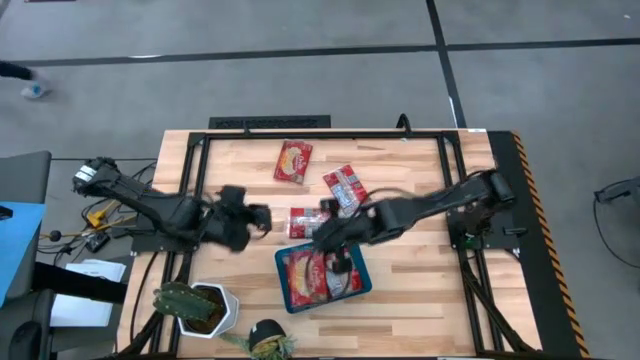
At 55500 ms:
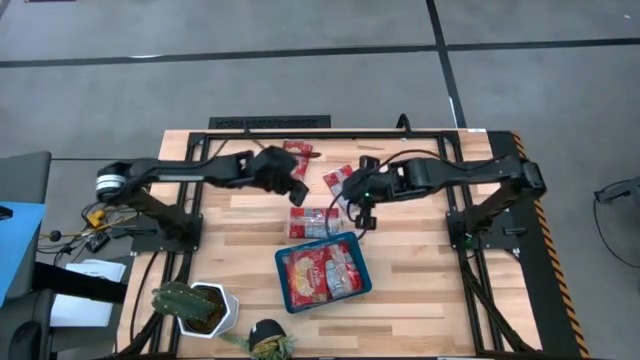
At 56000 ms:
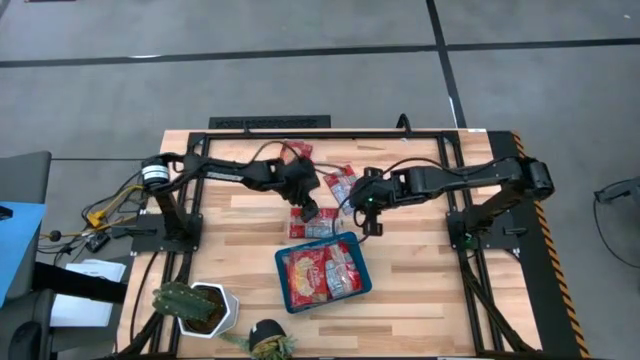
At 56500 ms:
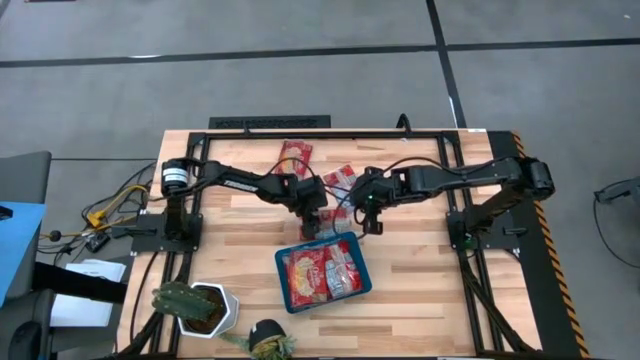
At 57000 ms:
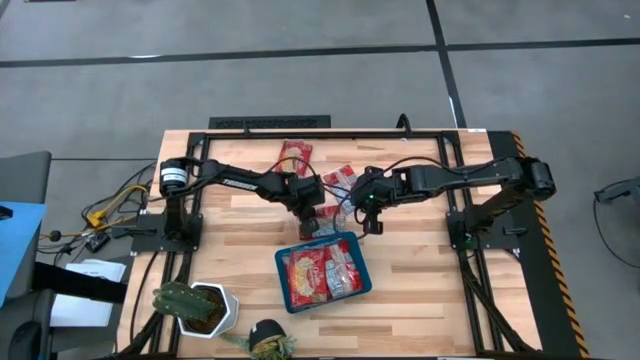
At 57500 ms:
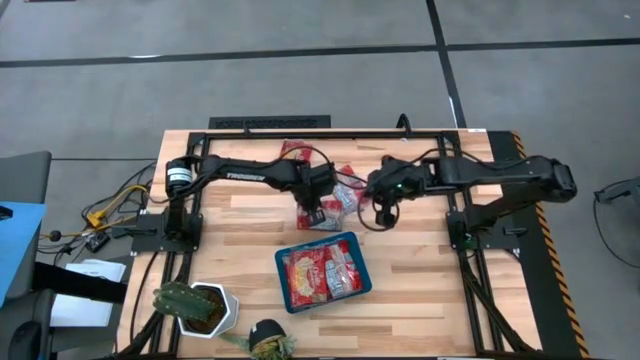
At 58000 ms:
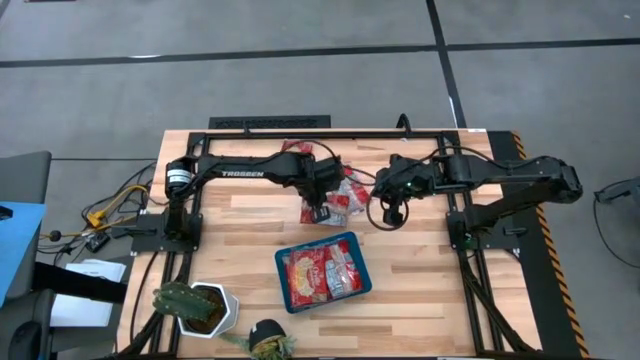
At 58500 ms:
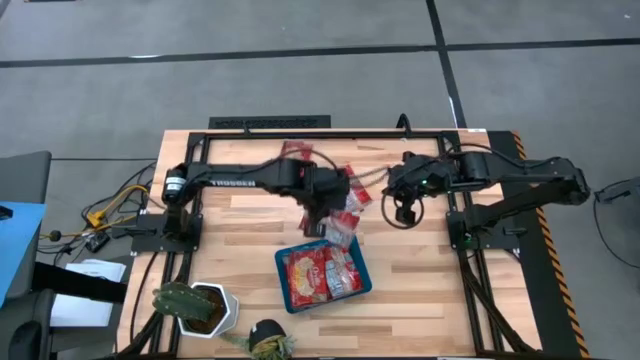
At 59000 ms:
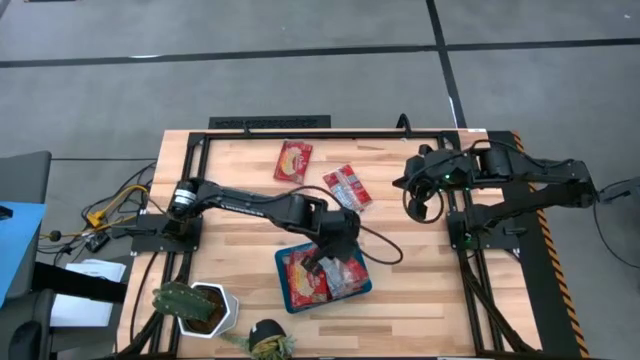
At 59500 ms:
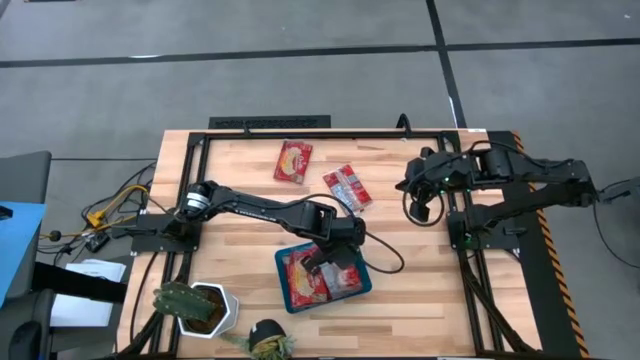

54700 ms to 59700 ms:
Task: Sort popcorn bags into baskets
Put the popcorn bag into the blue bin

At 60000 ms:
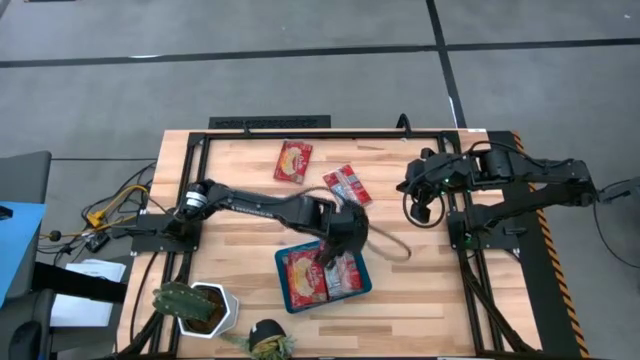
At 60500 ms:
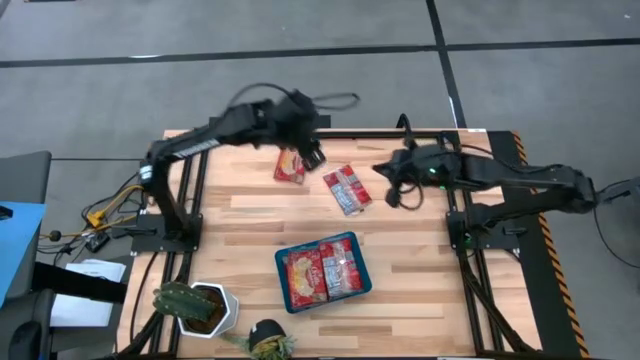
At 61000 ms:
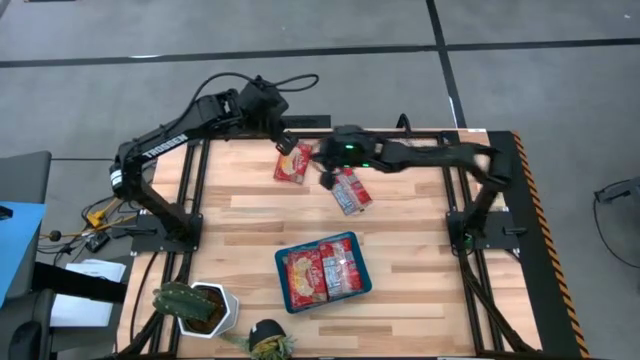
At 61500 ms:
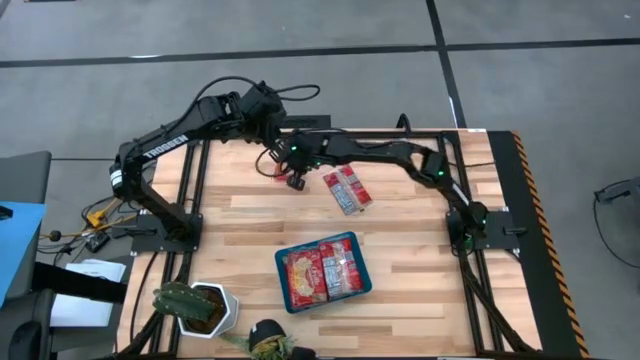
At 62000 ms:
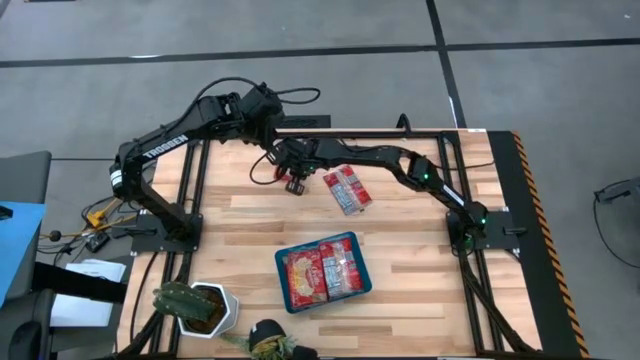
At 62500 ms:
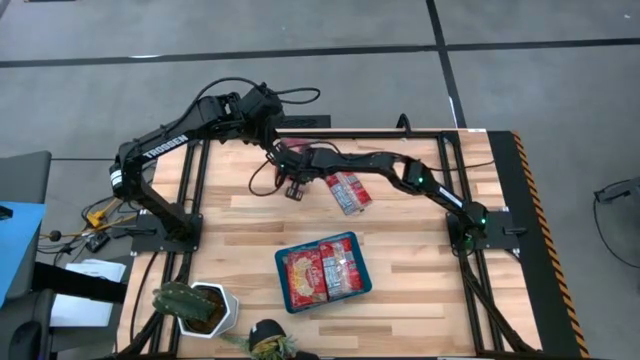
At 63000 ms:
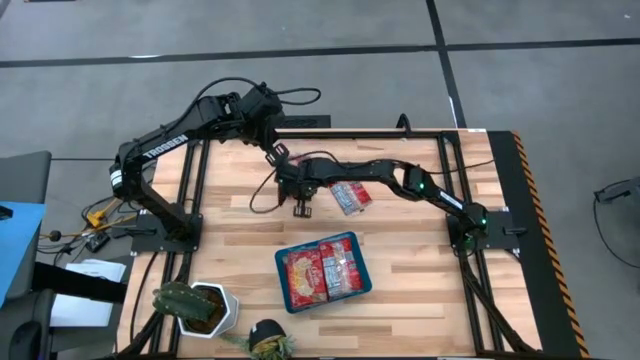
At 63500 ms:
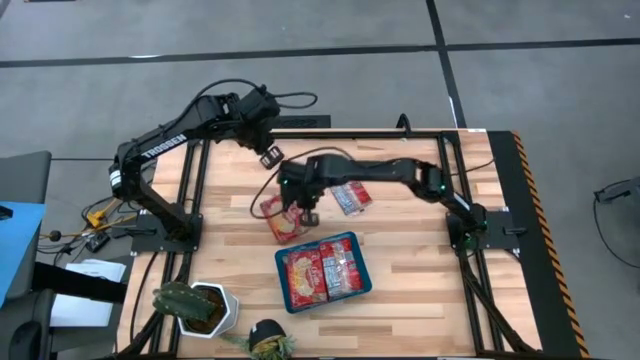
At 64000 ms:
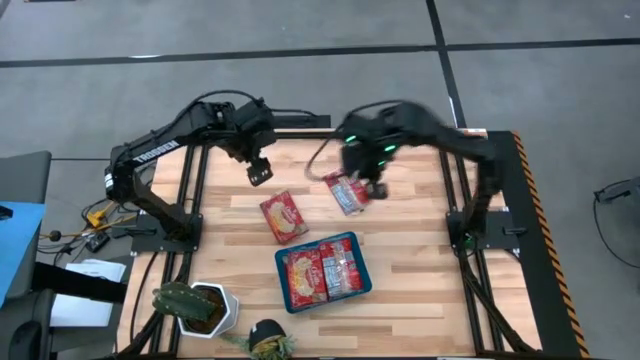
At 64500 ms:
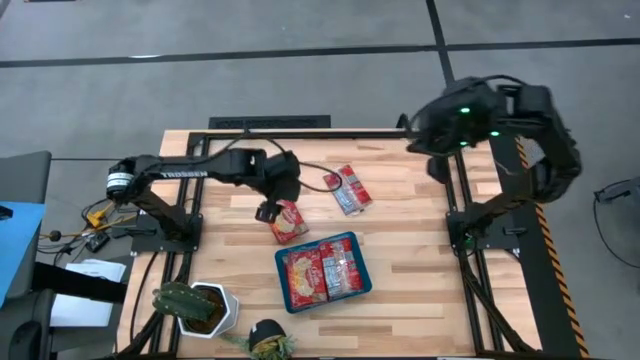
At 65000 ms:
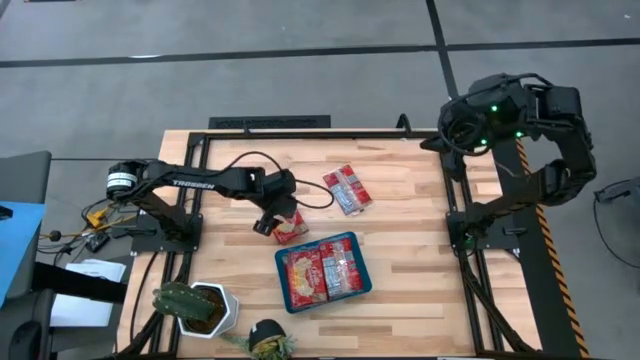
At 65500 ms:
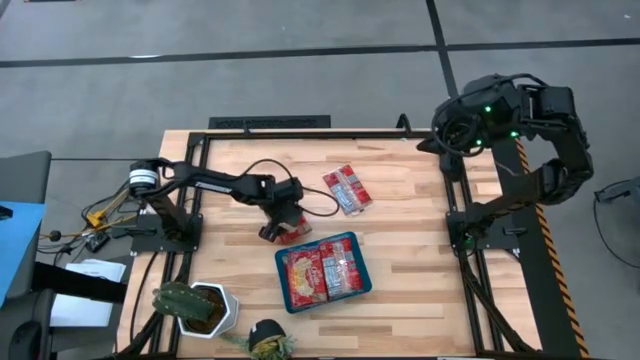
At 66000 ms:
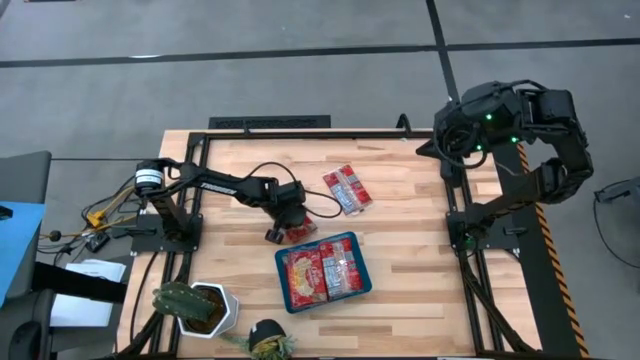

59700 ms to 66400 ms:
Put the popcorn bag into the blue bin

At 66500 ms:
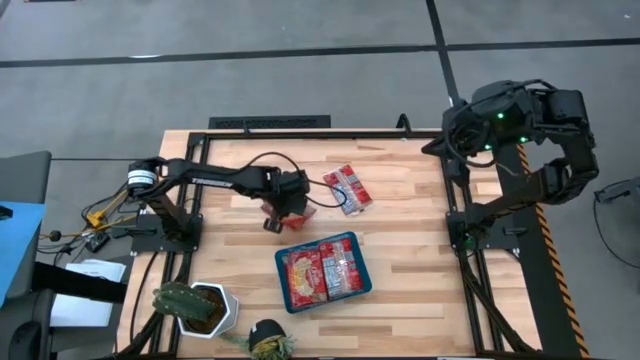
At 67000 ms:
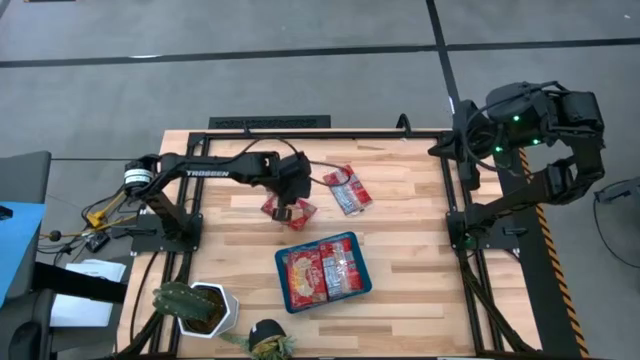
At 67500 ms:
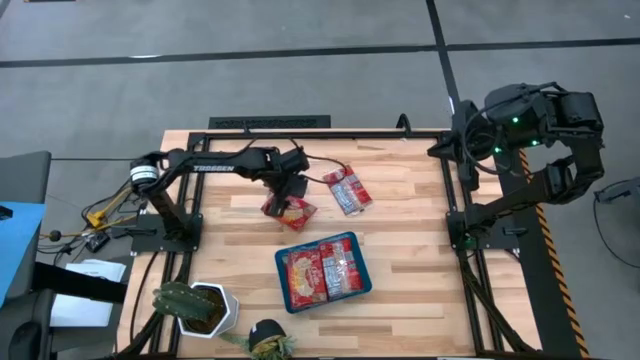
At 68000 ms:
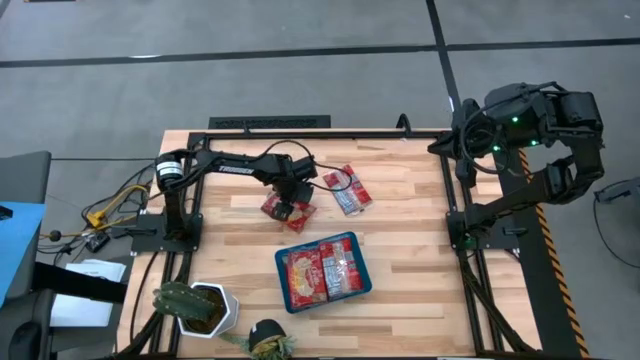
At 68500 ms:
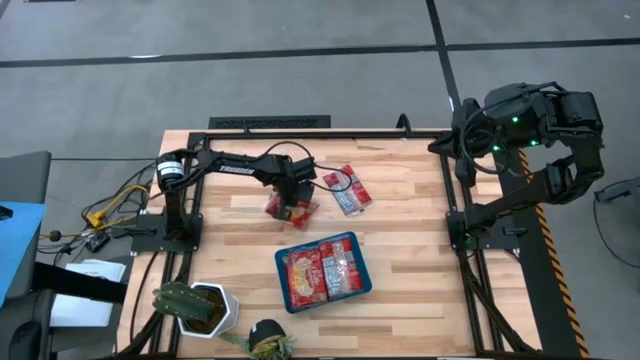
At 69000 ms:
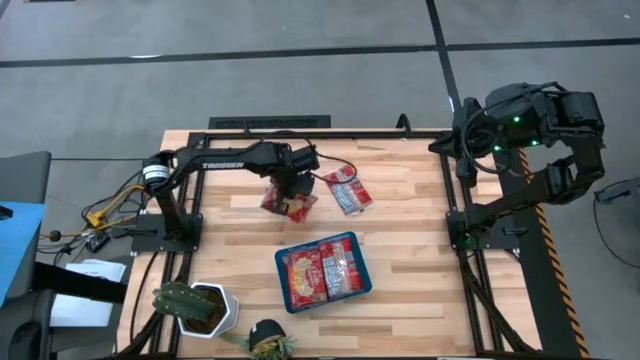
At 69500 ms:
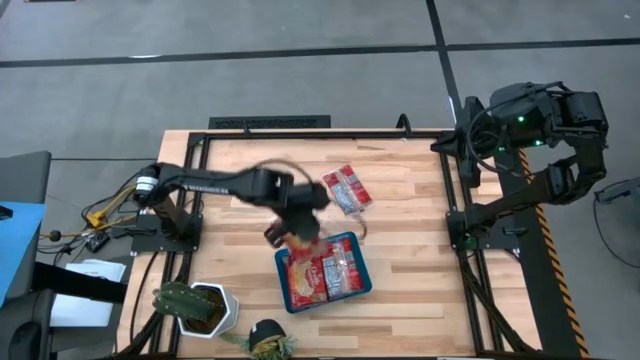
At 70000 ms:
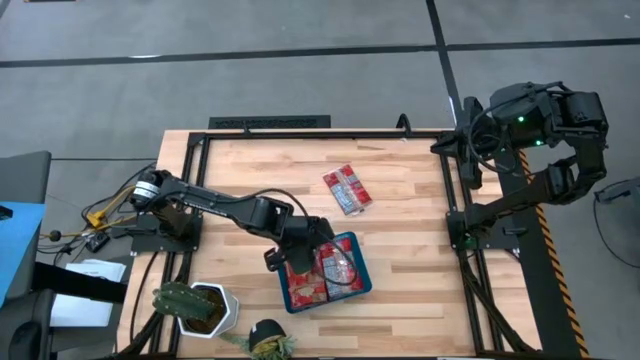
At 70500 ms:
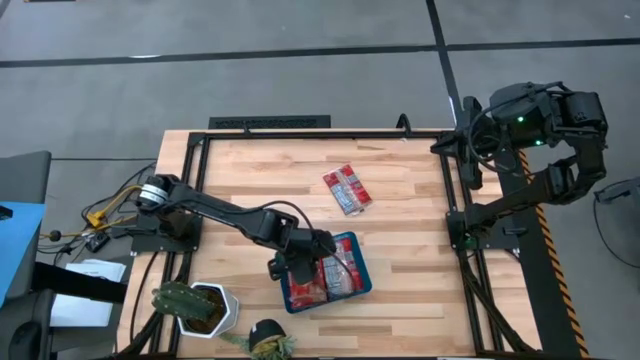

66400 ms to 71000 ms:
Put the popcorn bag into the blue bin

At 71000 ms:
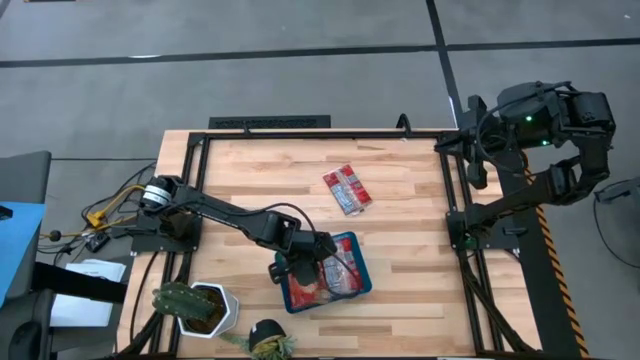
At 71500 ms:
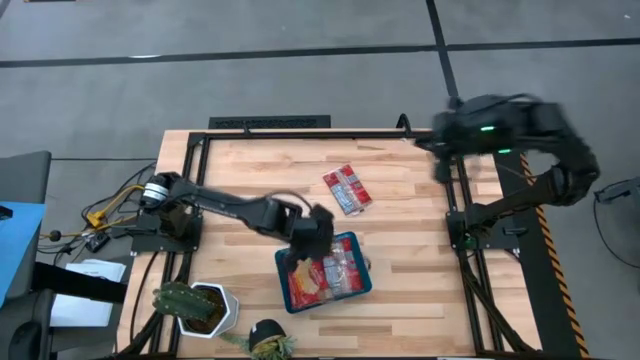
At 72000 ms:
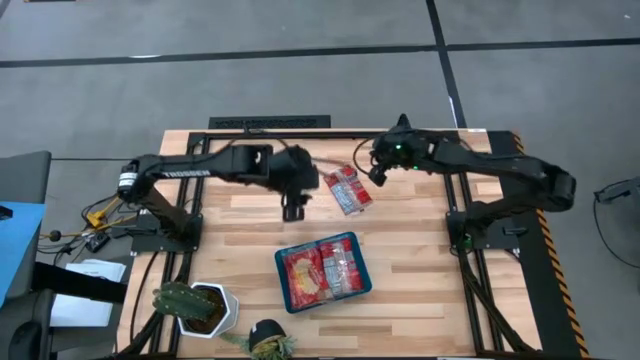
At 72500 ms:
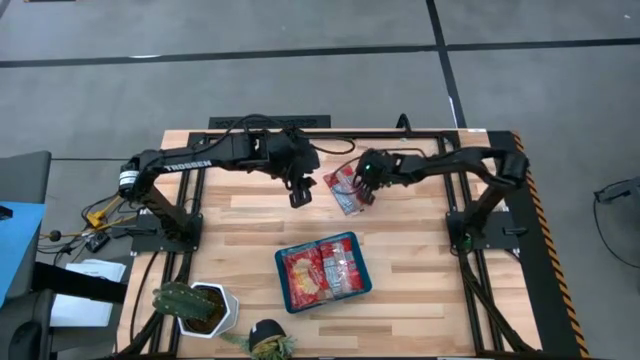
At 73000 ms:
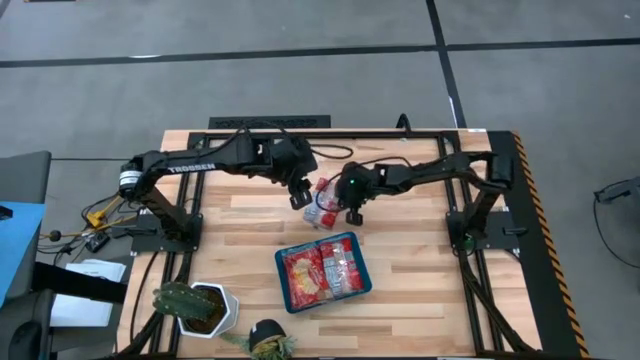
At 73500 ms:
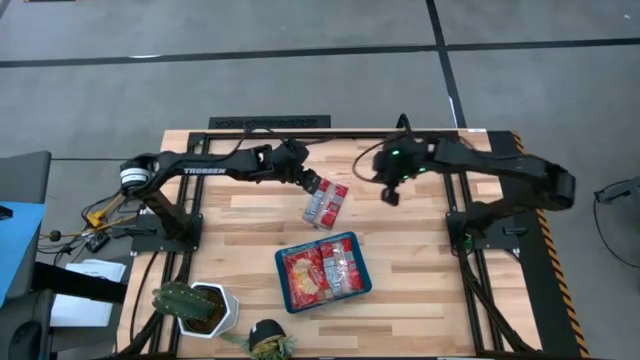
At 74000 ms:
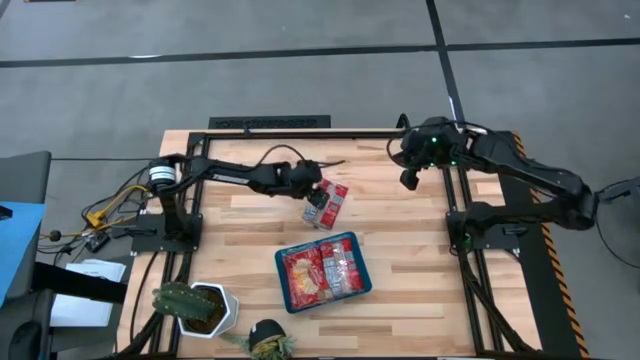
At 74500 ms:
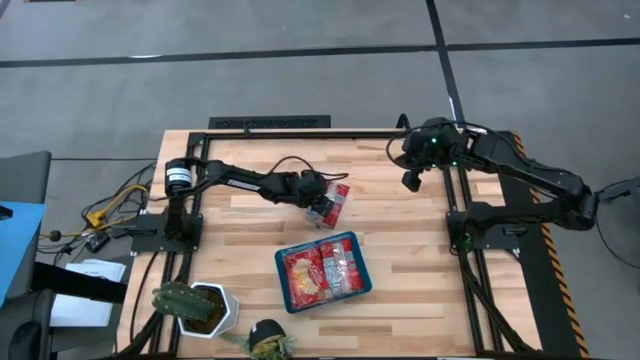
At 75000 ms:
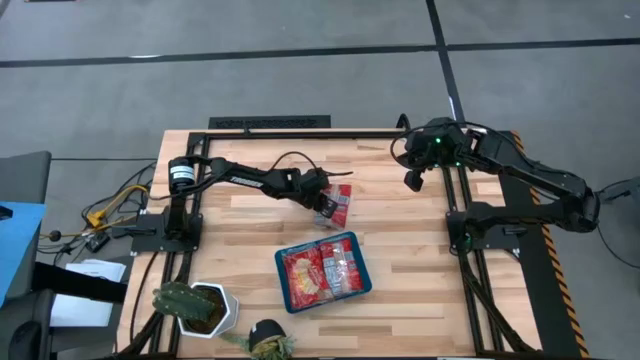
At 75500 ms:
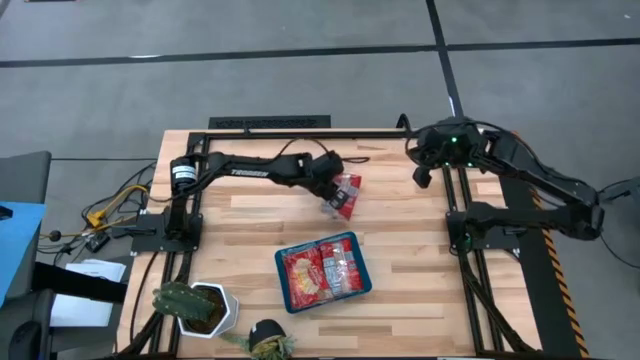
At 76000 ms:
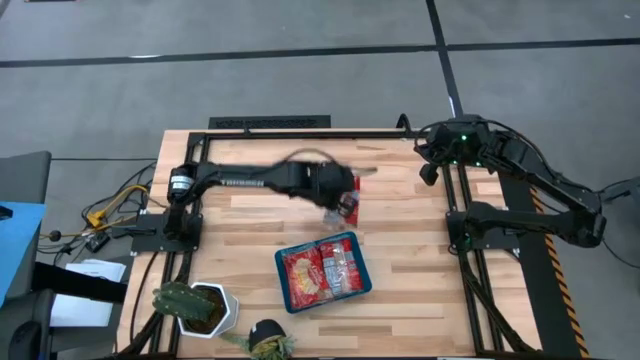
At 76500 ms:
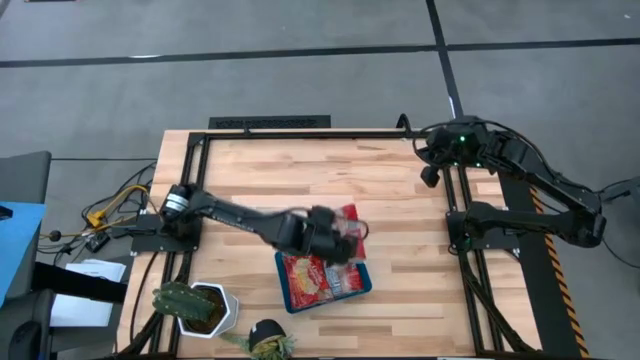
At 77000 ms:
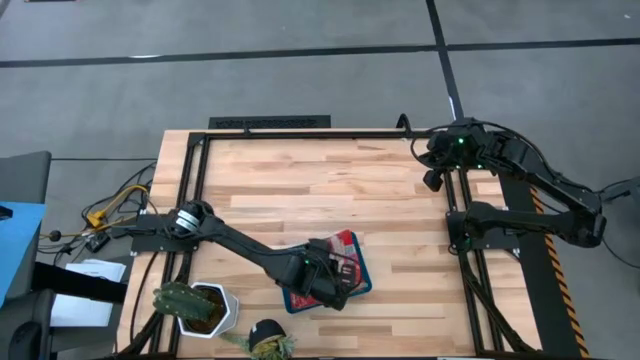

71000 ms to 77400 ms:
Put the popcorn bag into the blue bin
